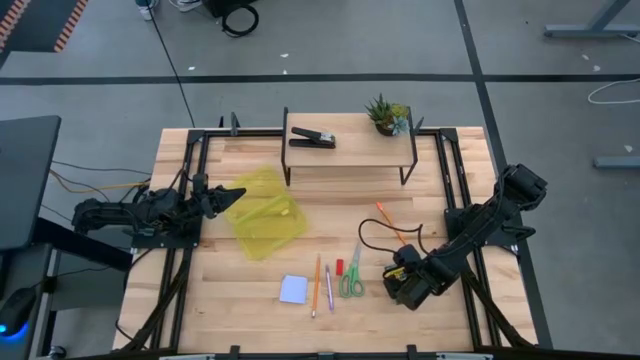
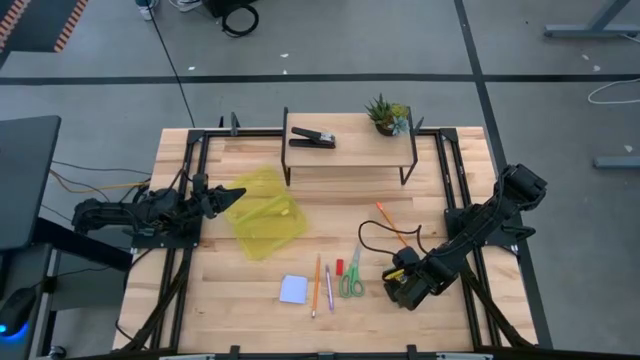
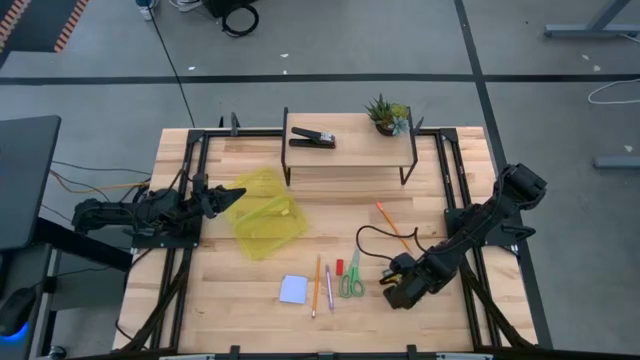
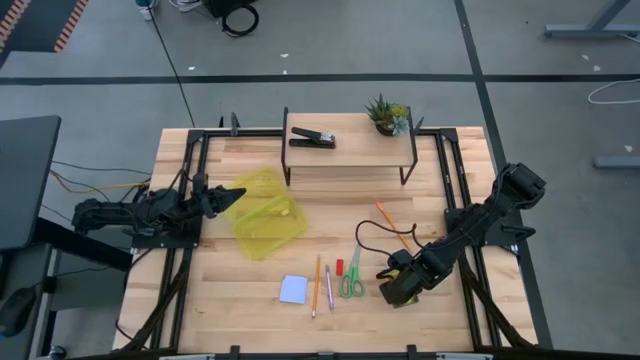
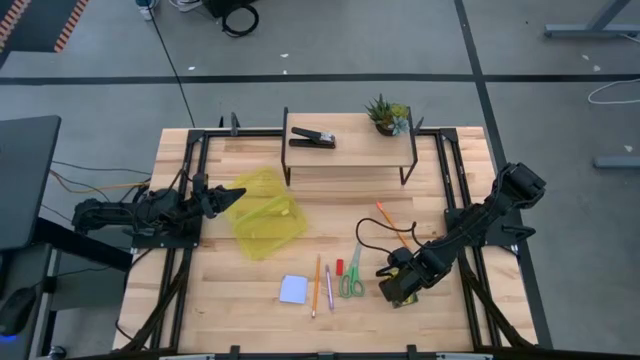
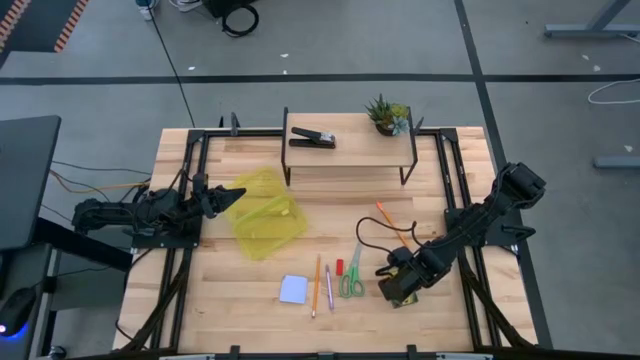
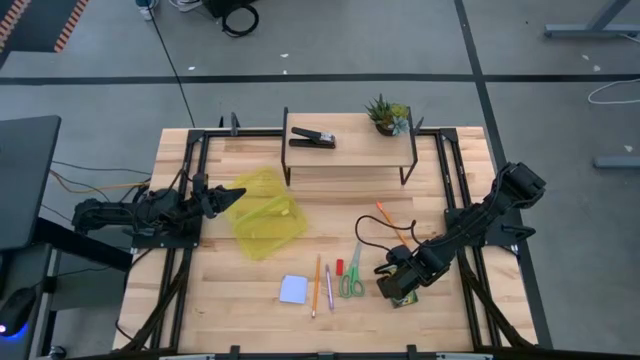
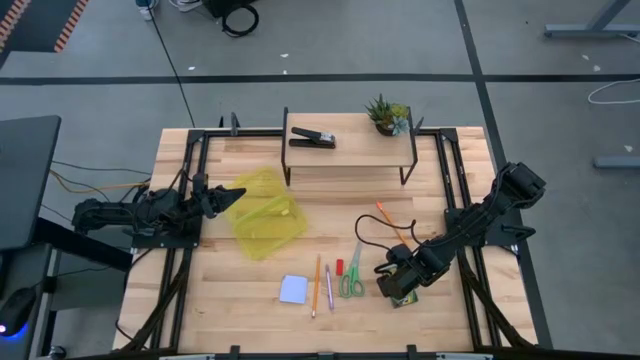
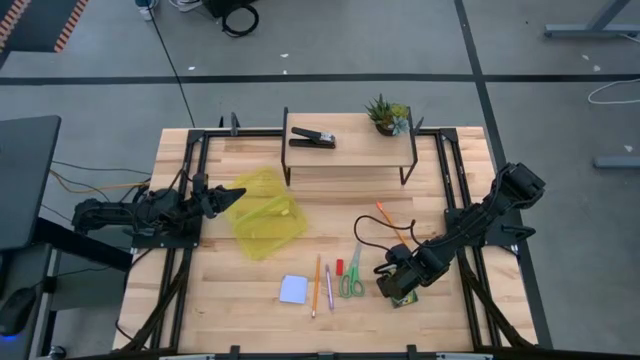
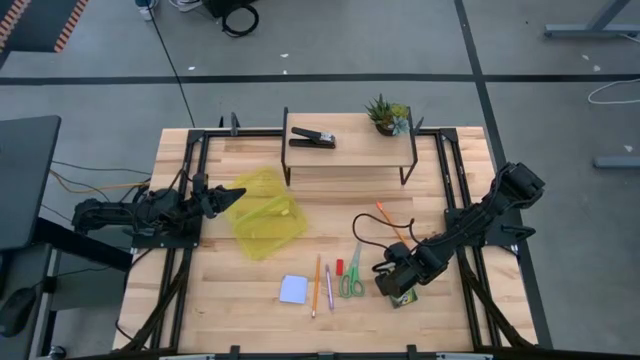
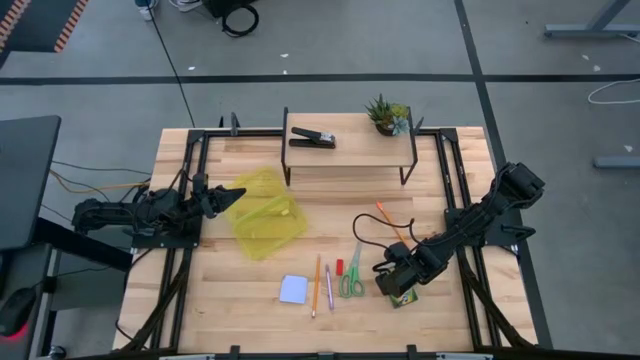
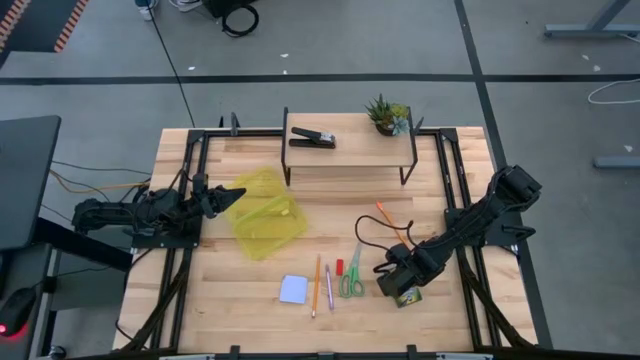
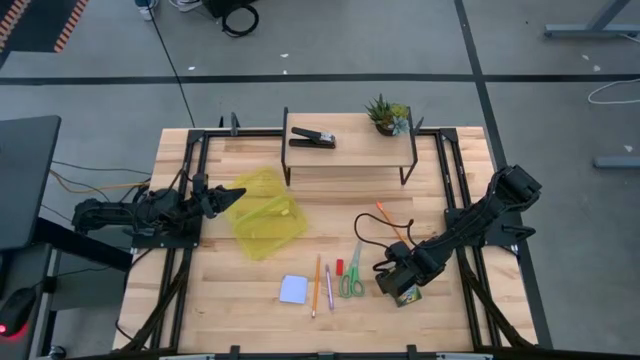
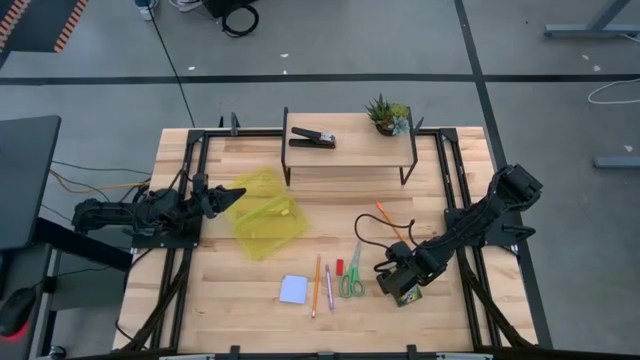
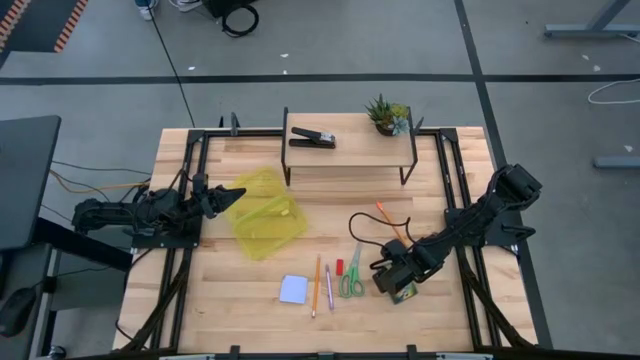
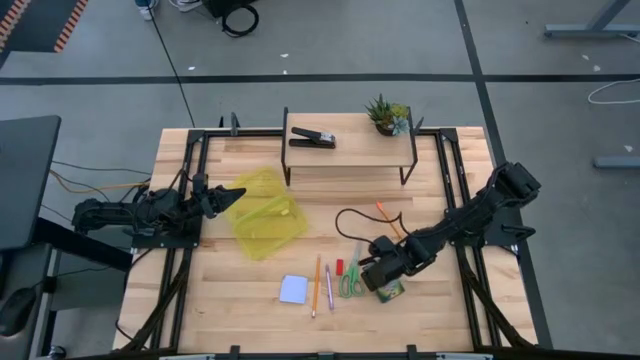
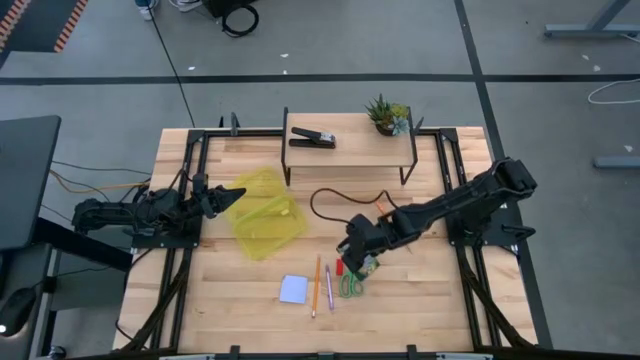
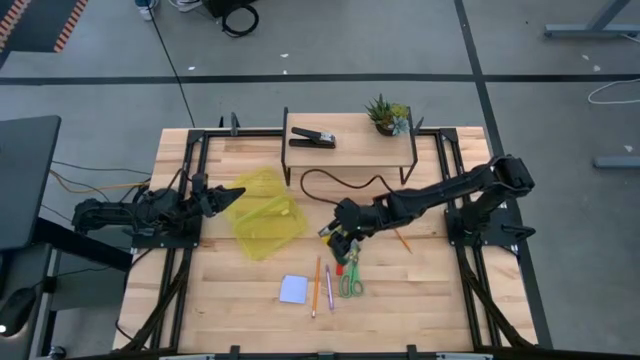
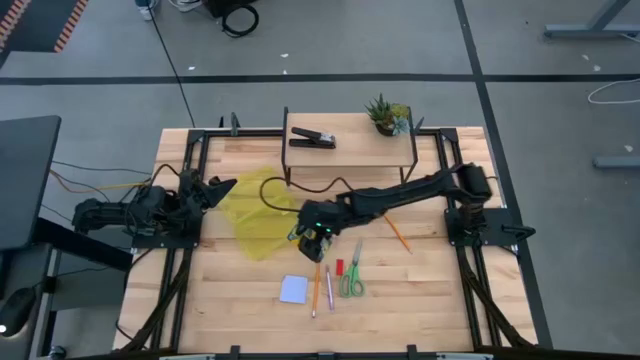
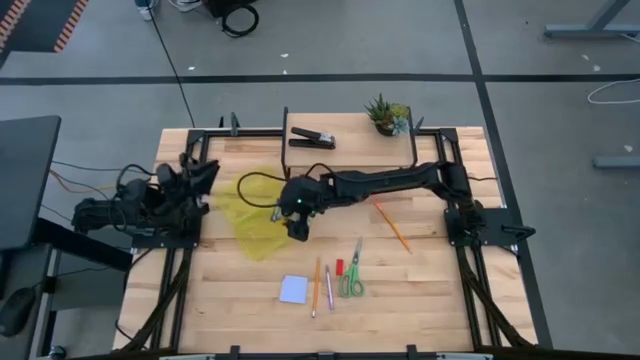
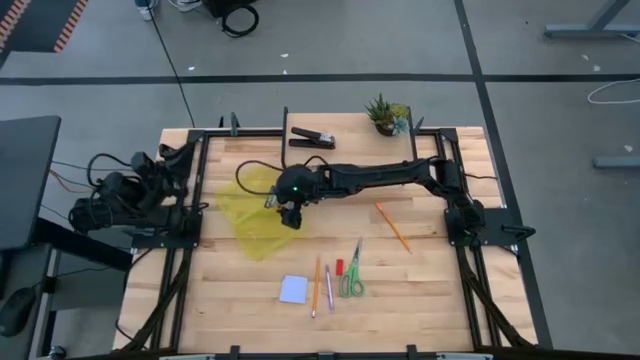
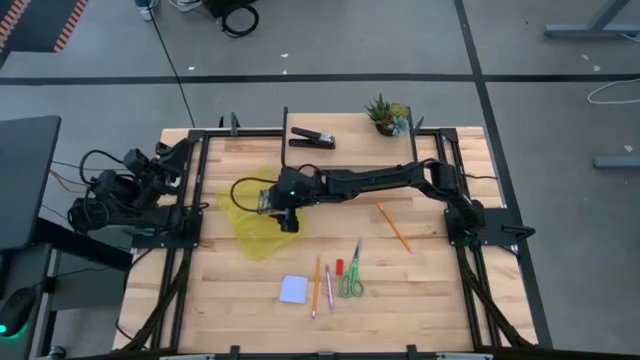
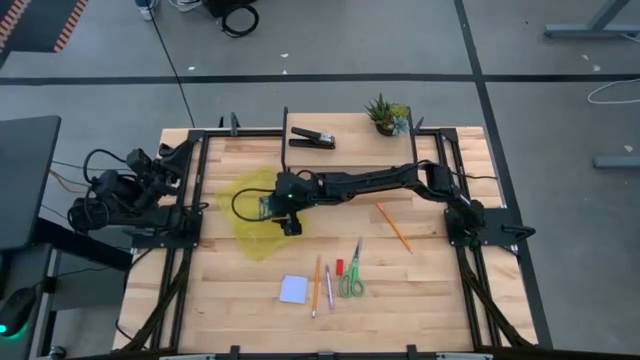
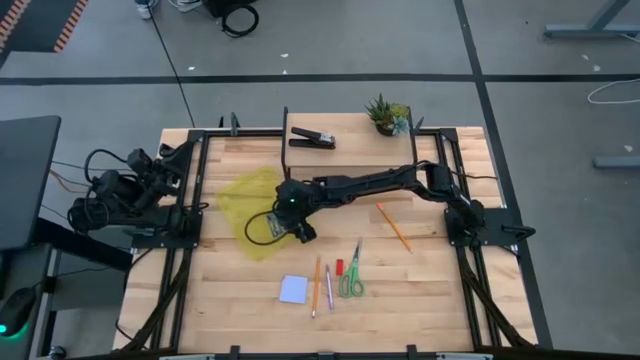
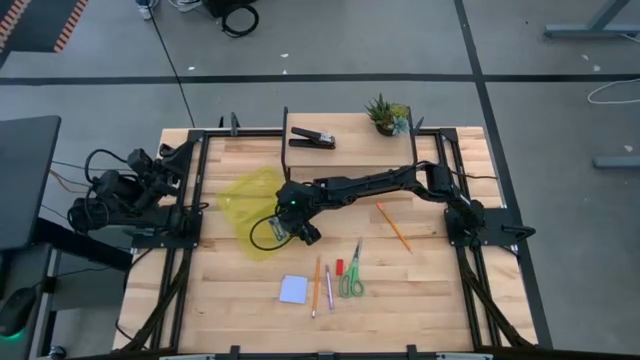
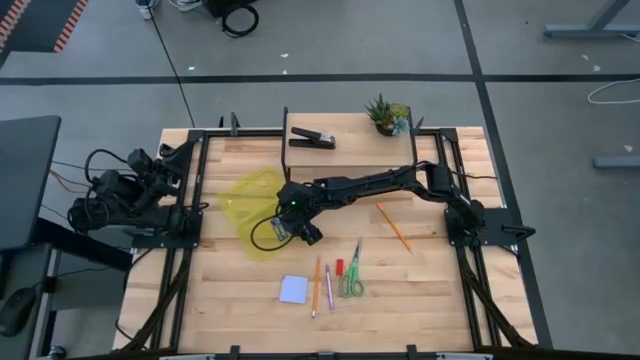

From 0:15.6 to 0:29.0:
Task: Pack school essentials
Put the yellow crayon box into the yellow supply box

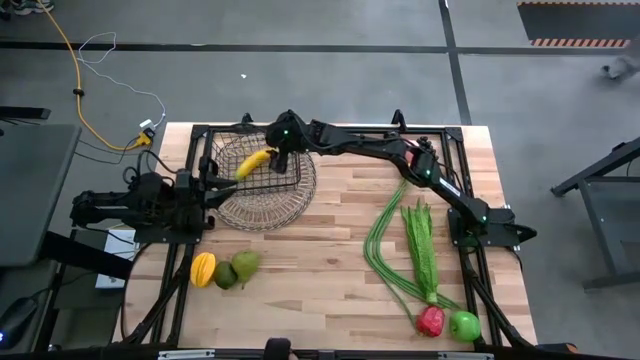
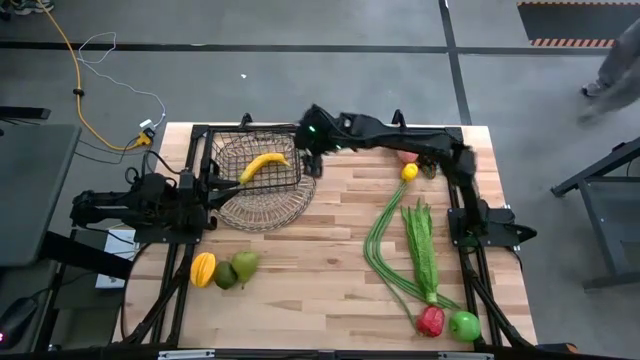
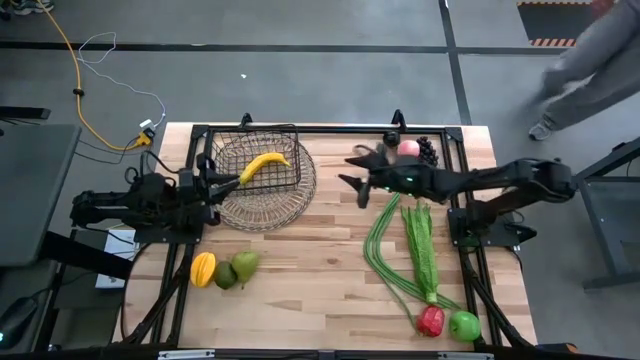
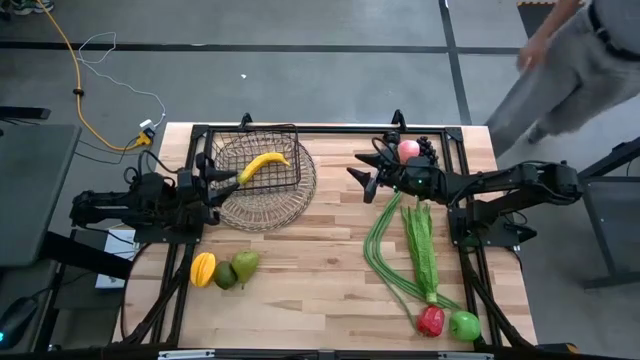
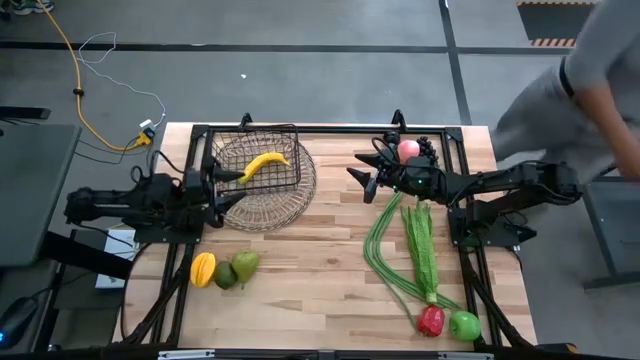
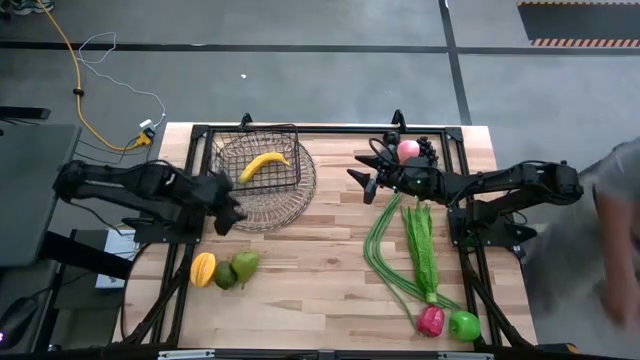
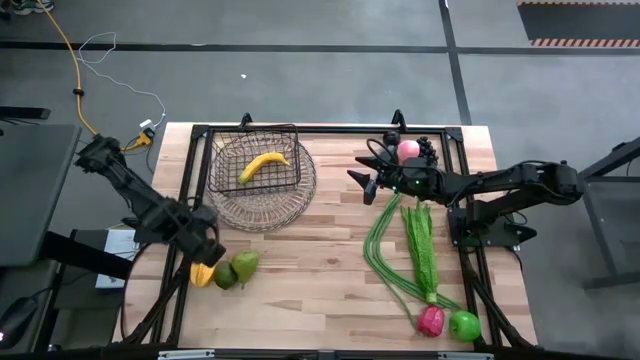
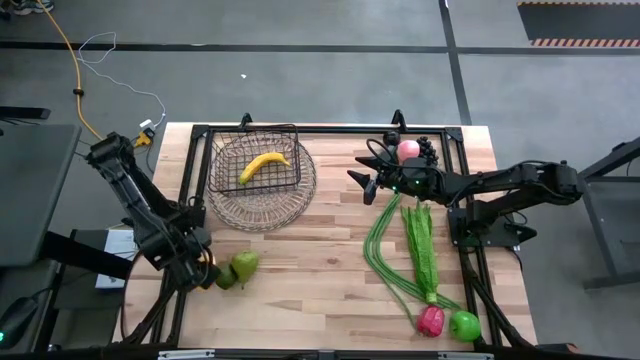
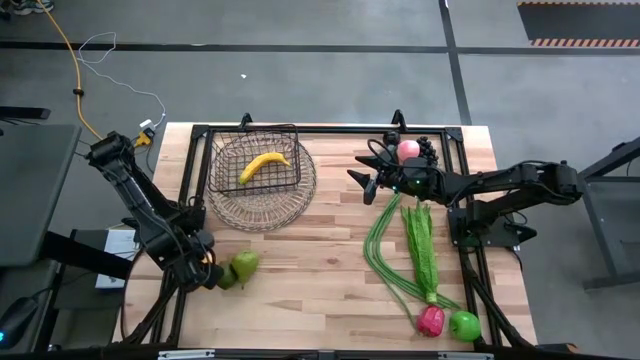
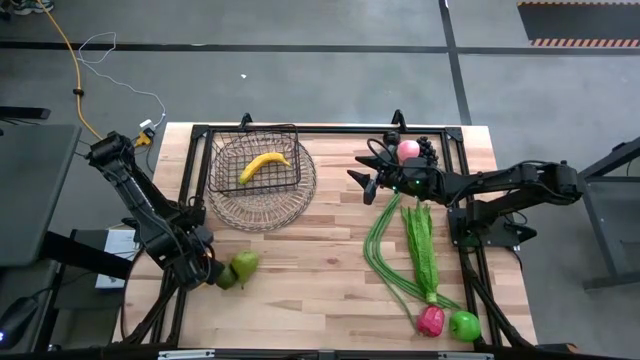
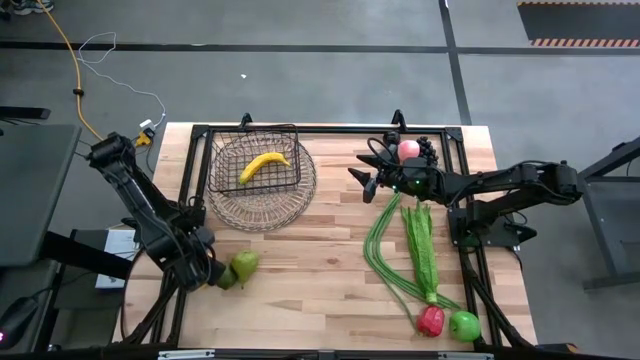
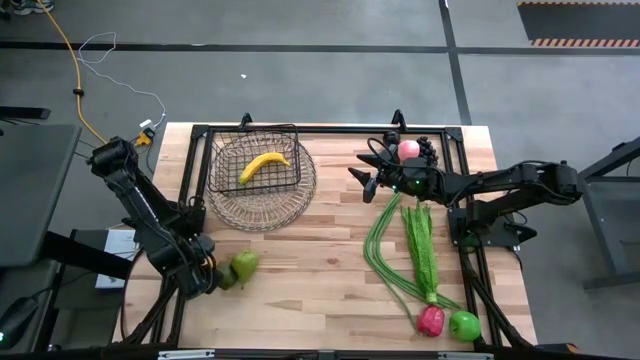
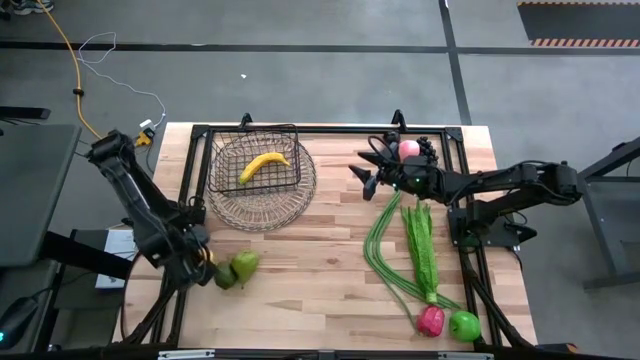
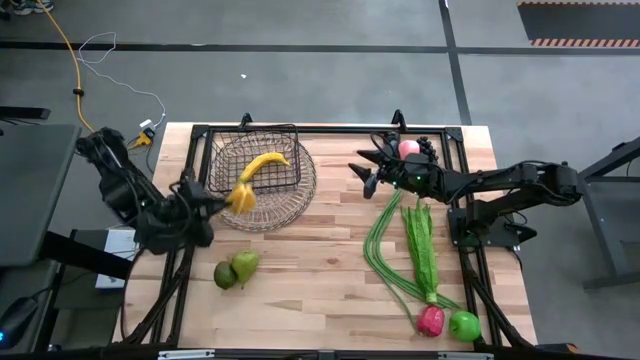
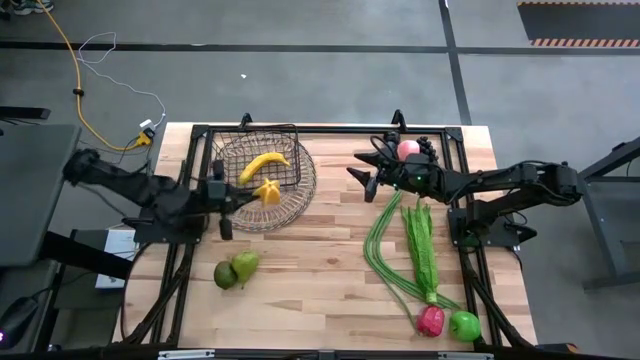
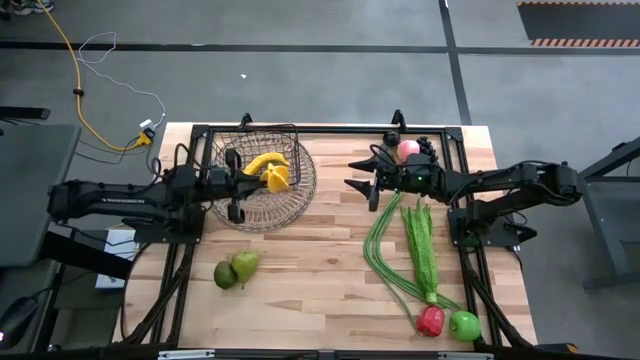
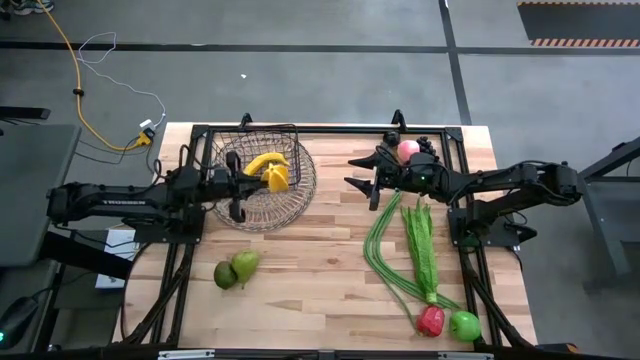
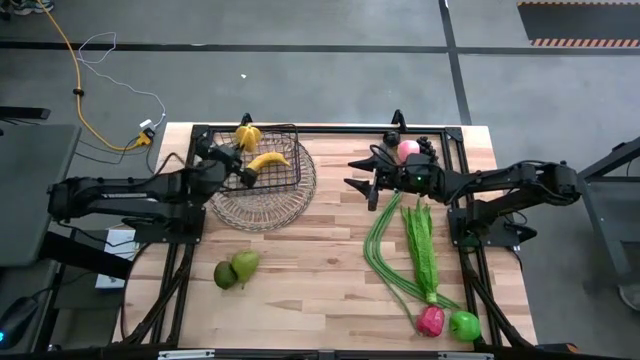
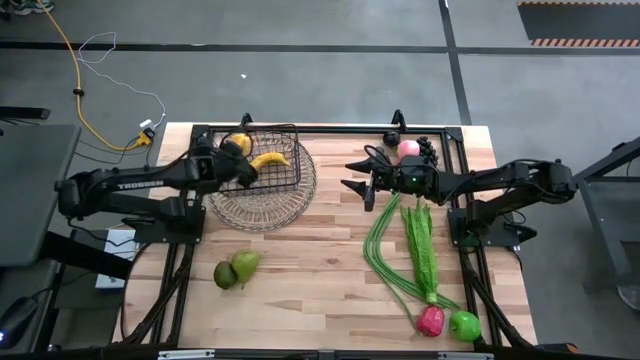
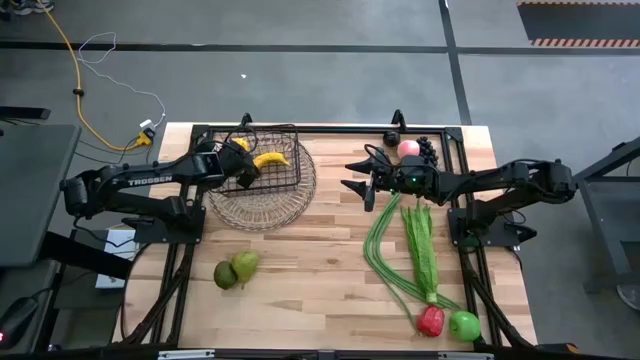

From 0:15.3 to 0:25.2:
Task: Build produce basket
Put the yellow starfruit into the wire basket
